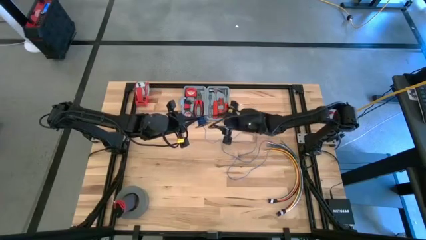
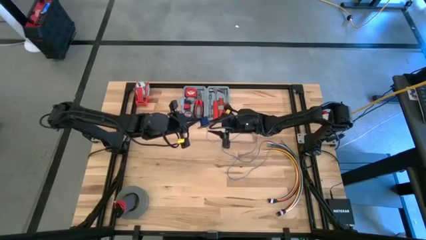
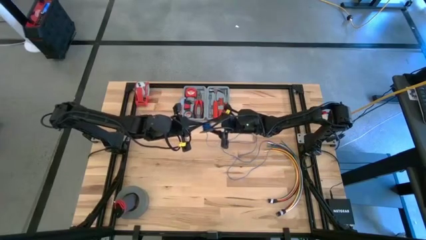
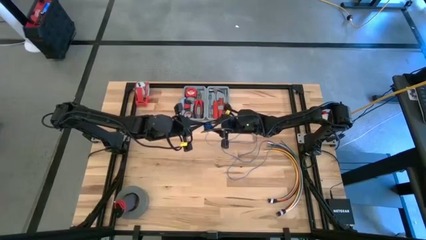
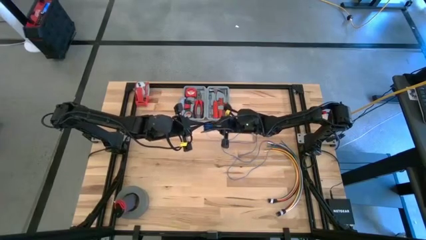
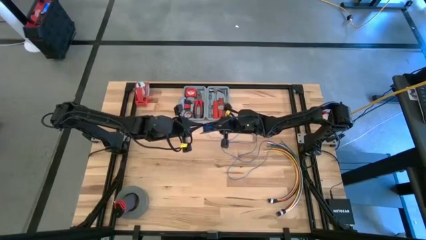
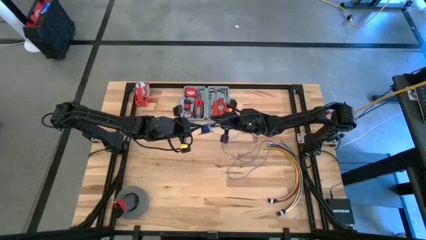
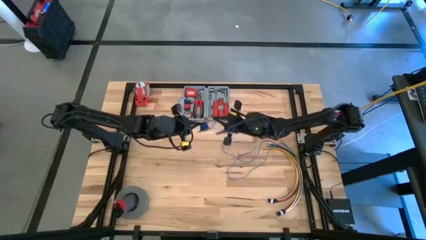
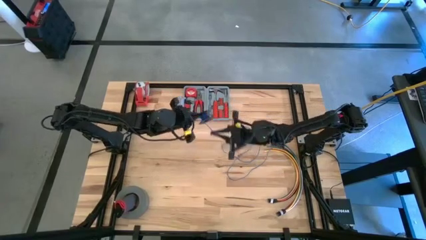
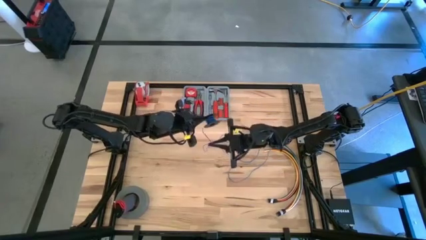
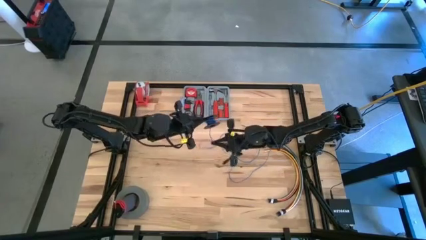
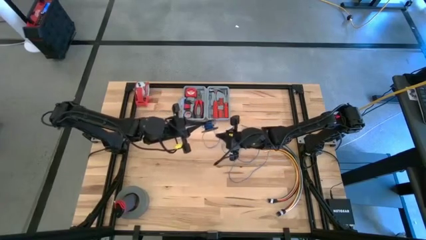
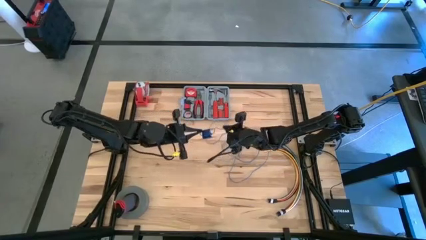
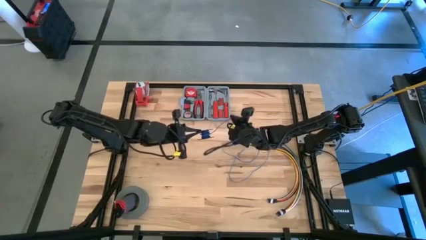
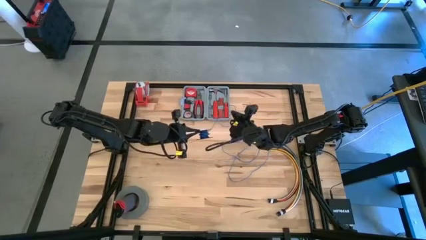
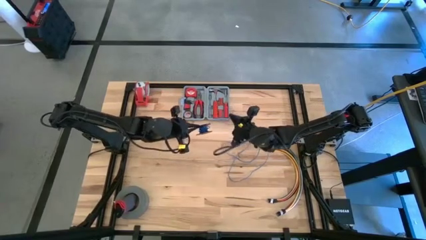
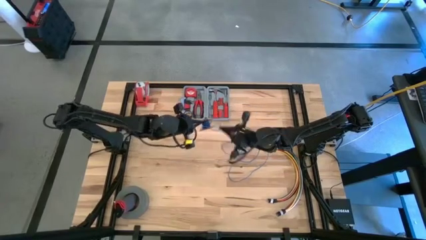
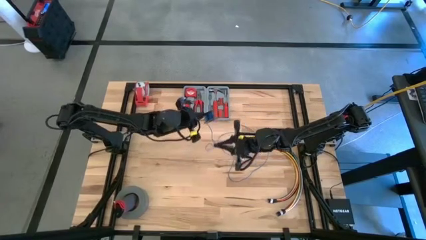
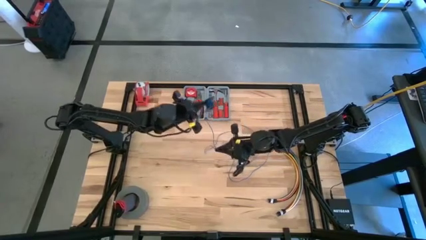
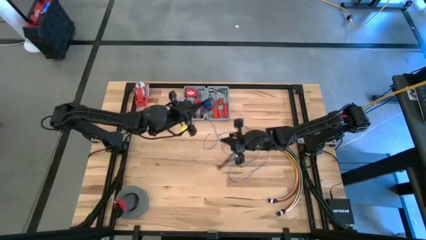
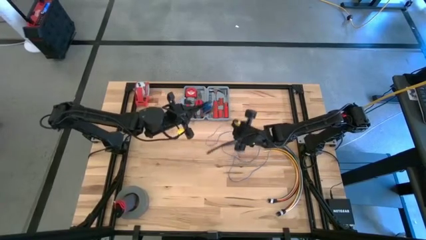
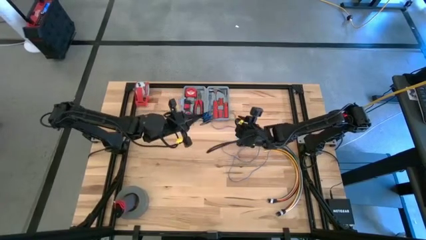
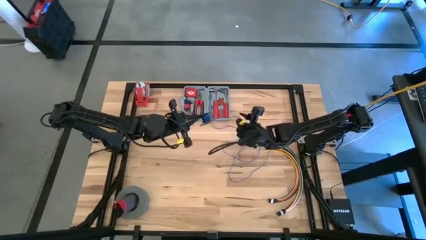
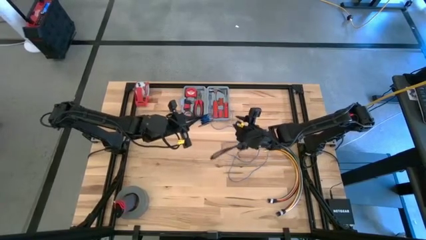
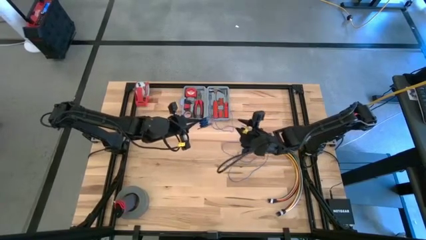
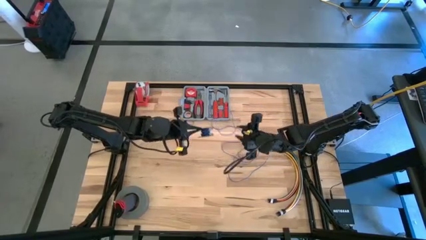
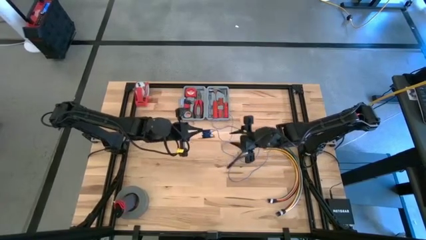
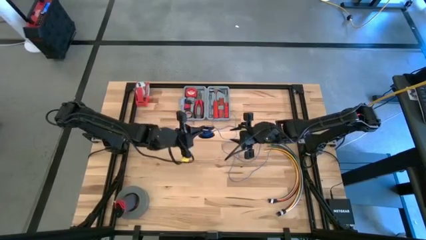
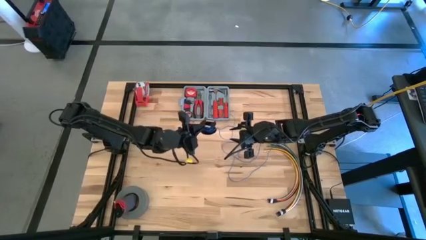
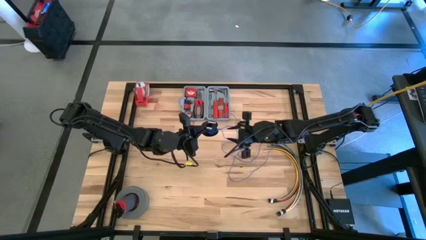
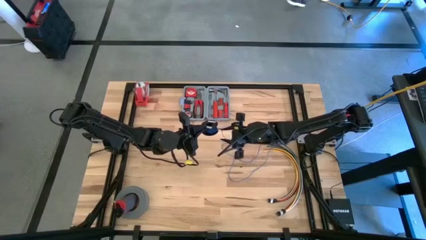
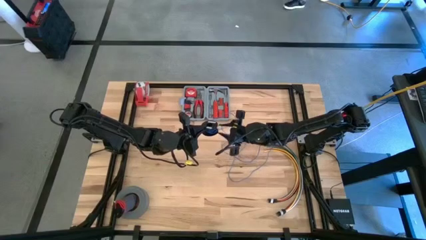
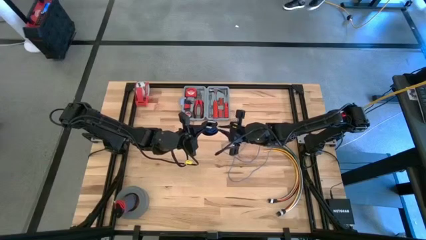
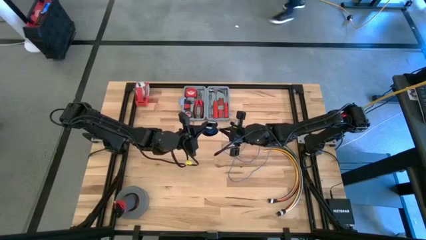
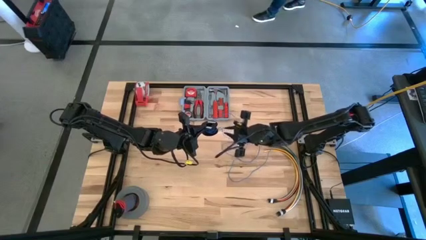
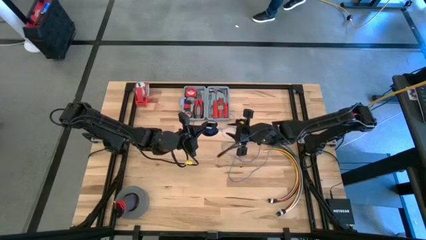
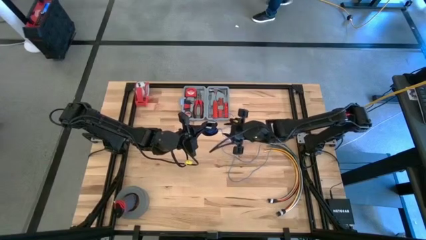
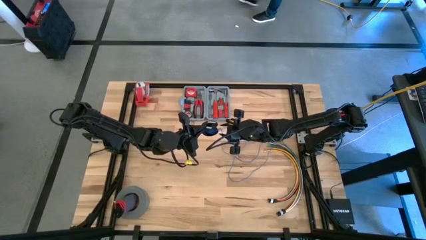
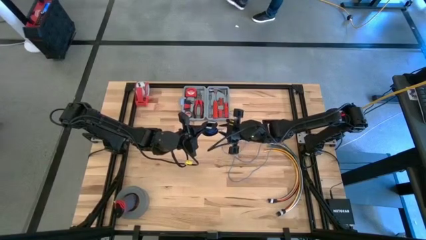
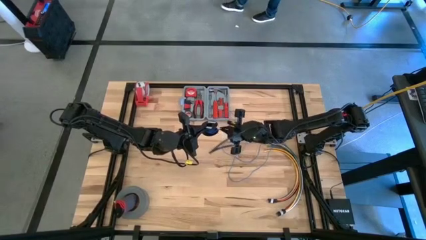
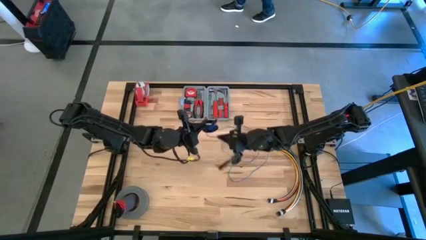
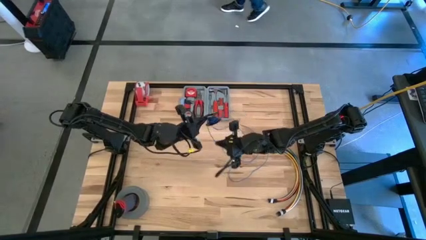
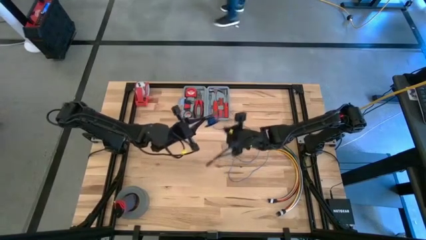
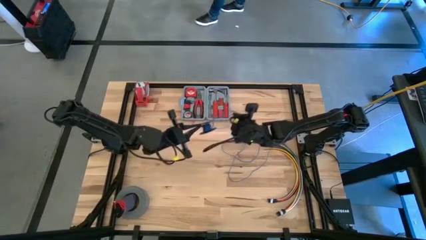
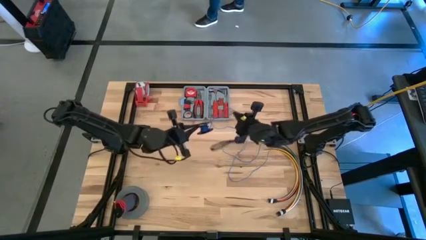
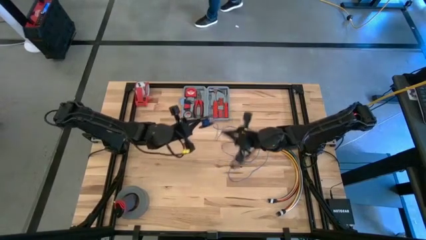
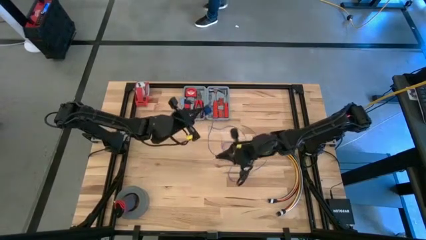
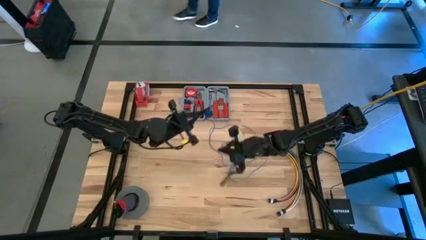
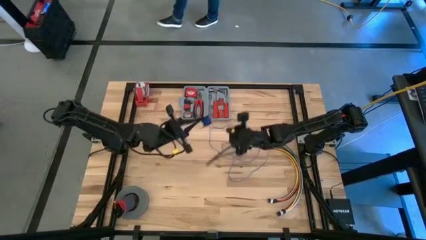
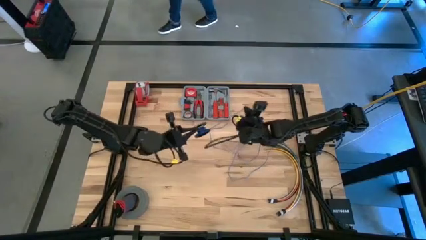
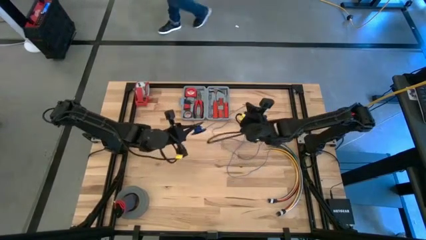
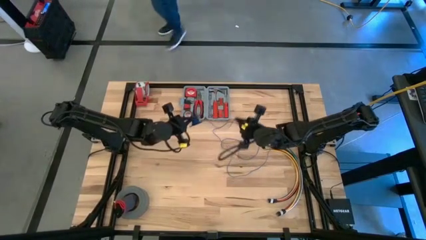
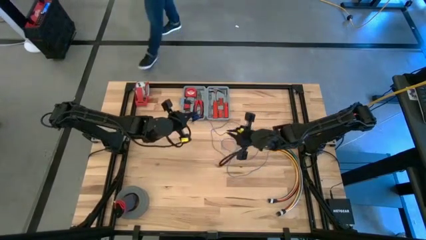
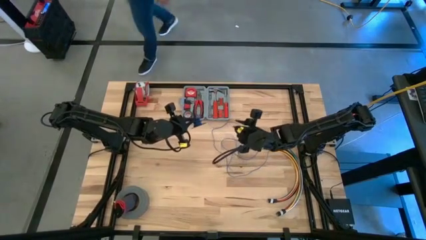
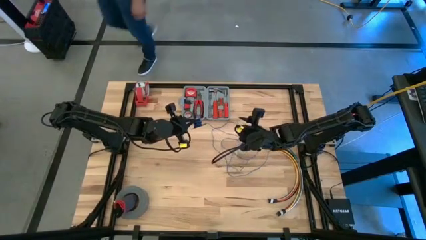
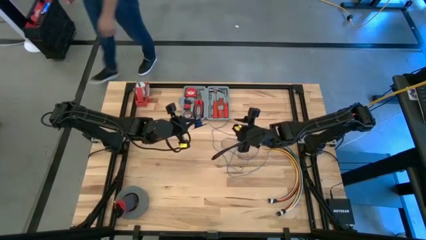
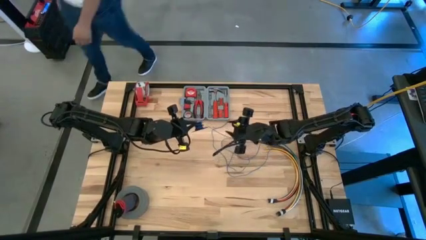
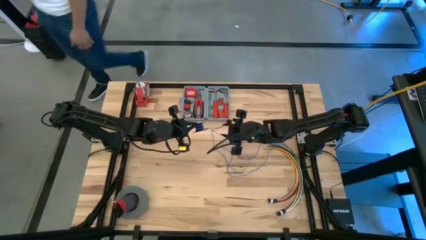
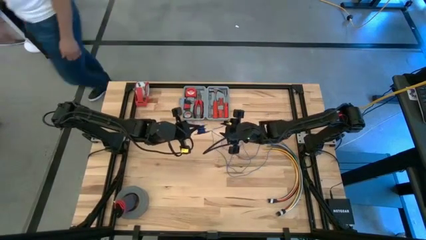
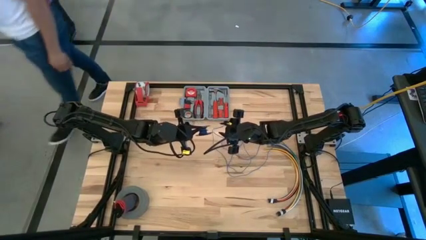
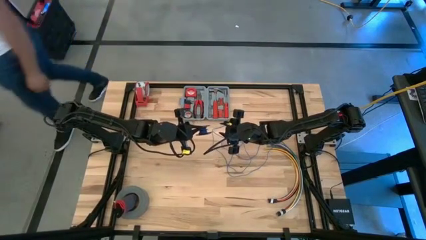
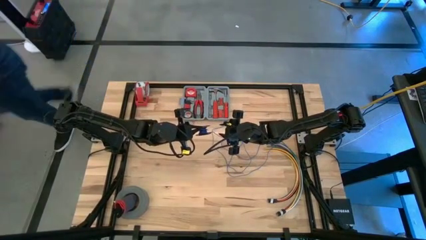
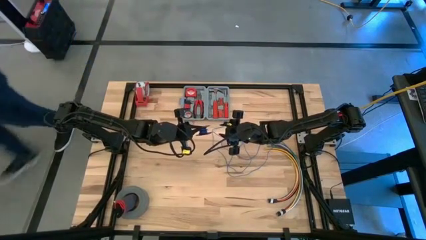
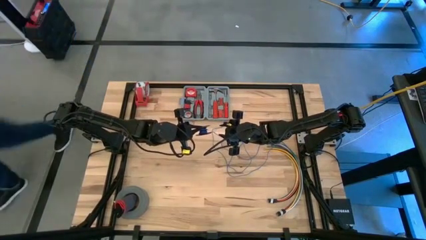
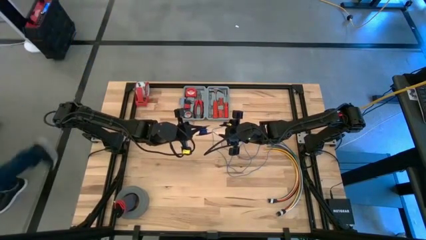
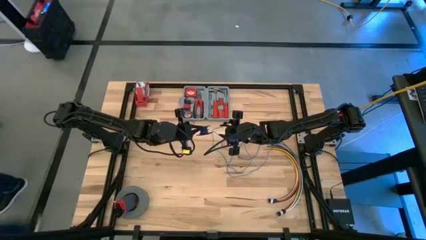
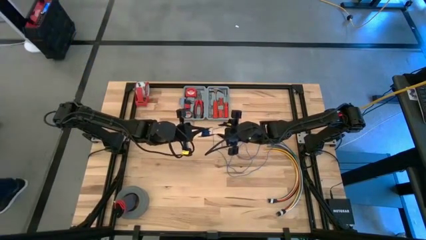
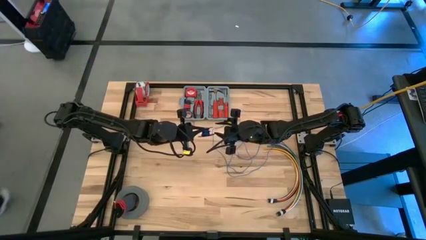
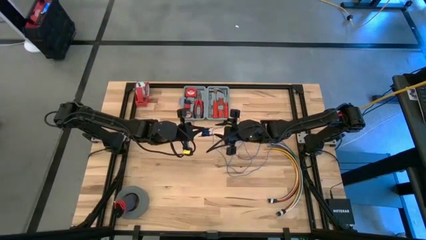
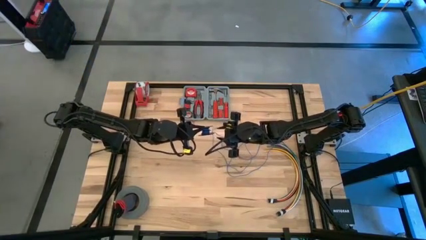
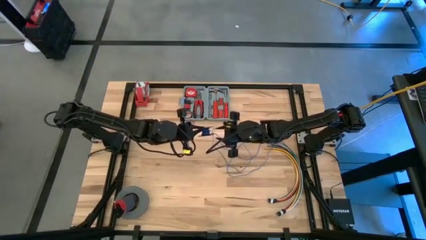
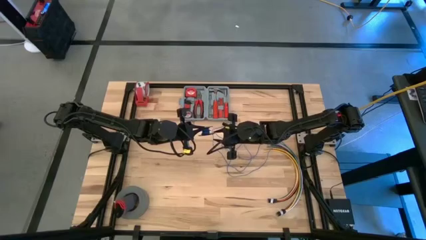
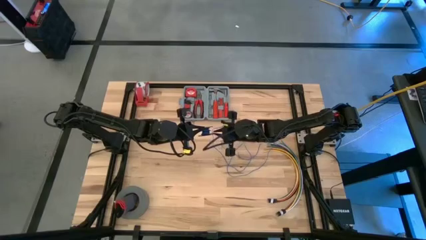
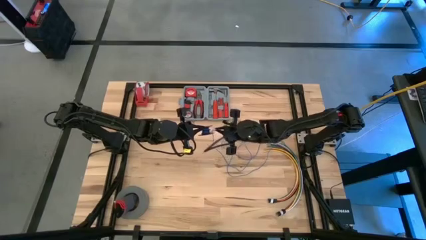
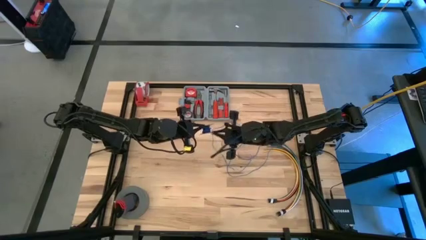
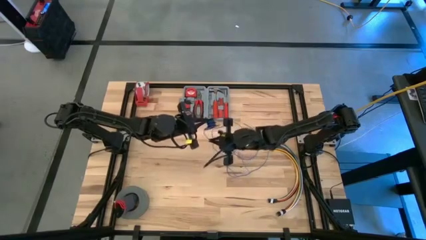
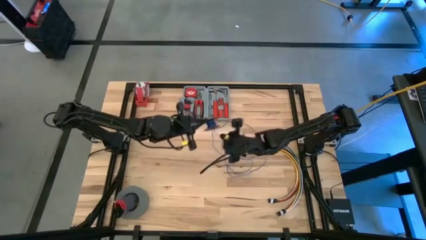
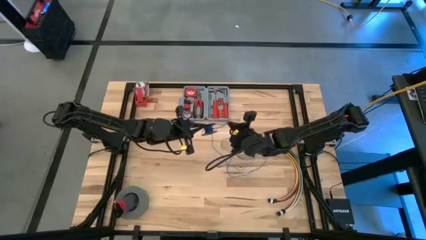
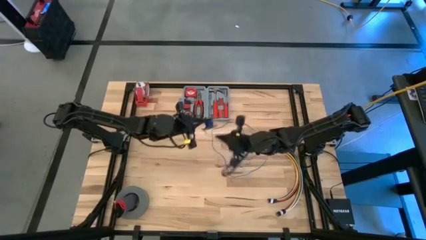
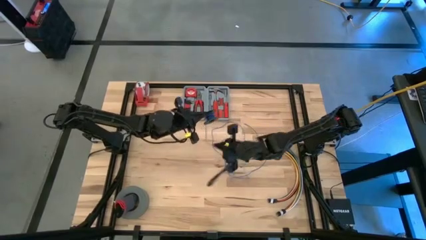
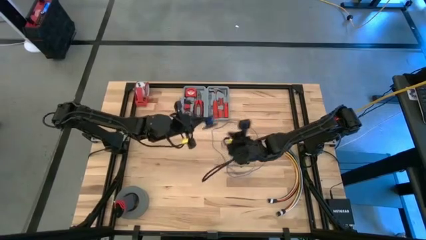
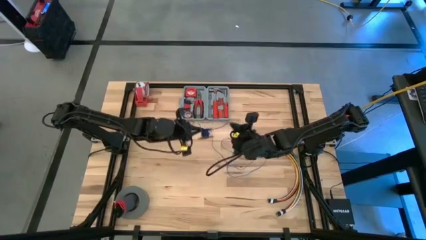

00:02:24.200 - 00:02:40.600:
Task: Coil cords
Uncoil the blue wire from the spool
